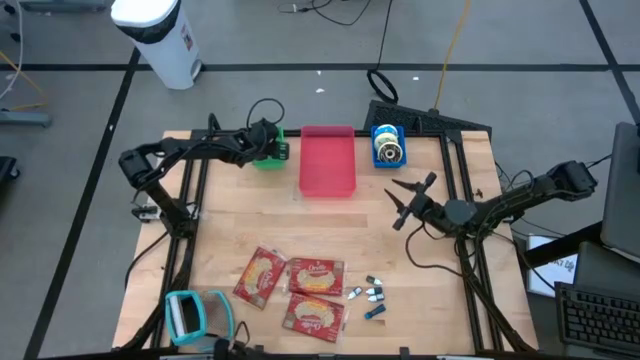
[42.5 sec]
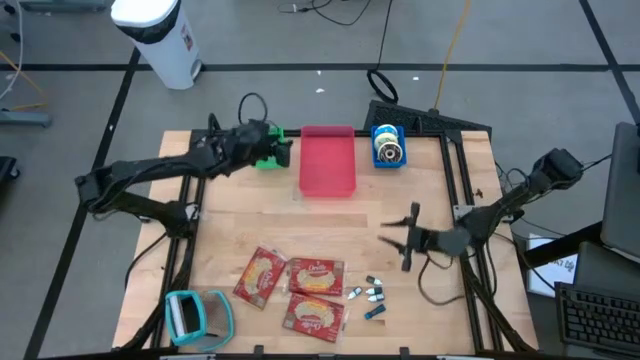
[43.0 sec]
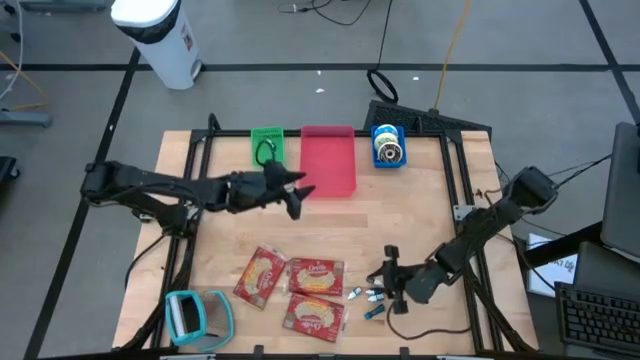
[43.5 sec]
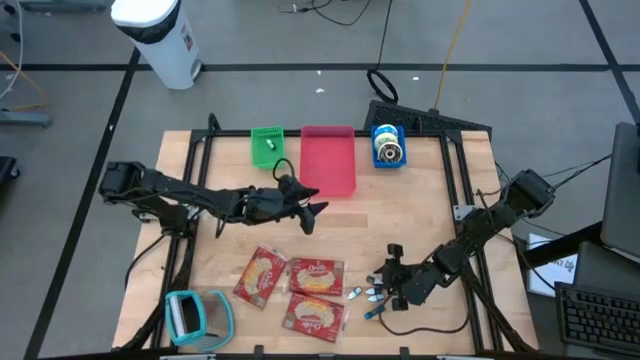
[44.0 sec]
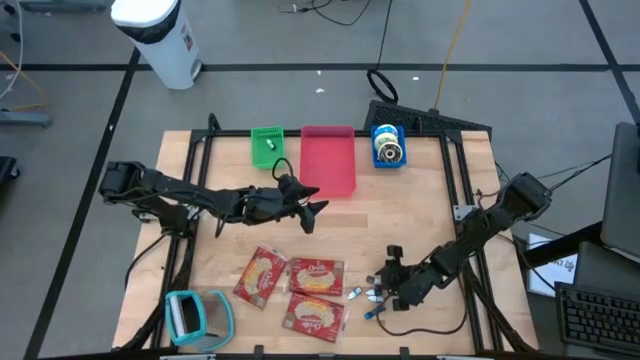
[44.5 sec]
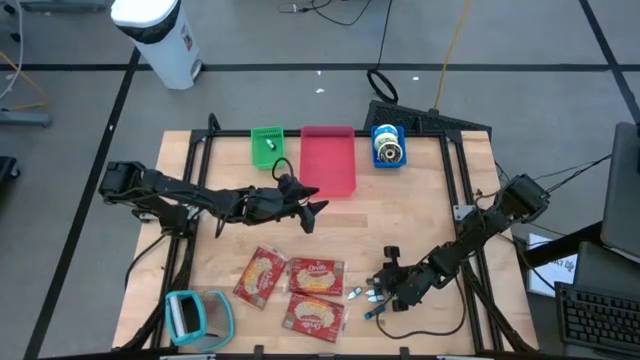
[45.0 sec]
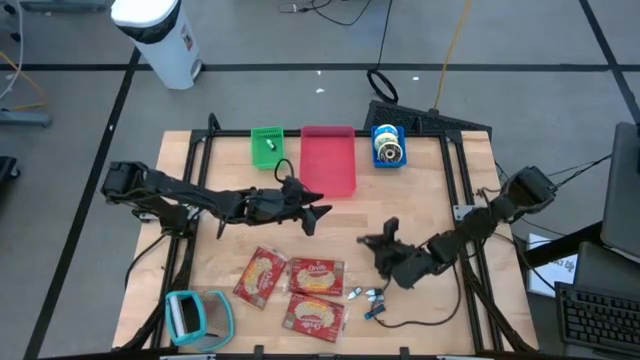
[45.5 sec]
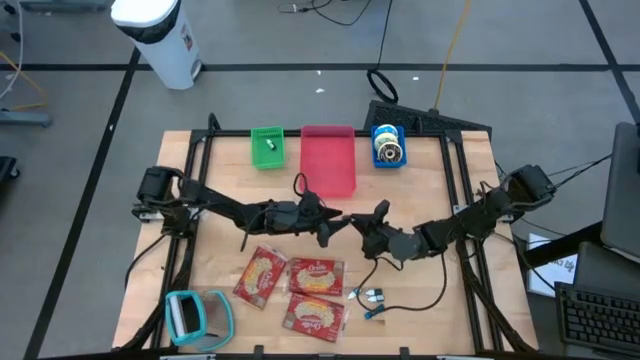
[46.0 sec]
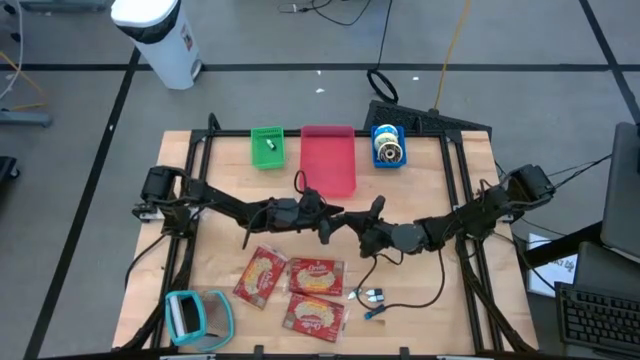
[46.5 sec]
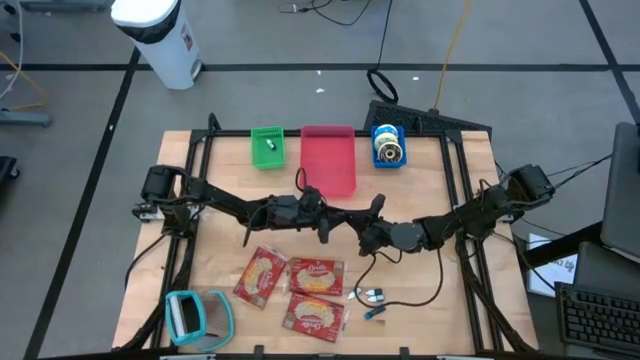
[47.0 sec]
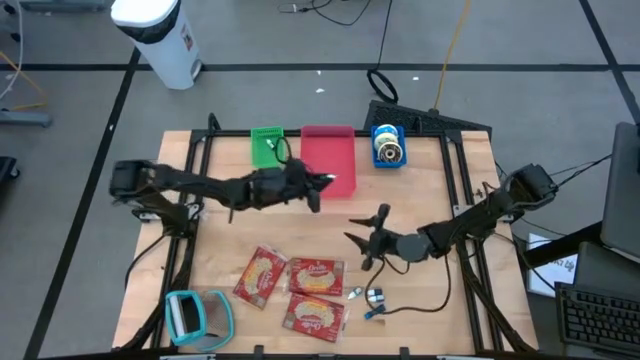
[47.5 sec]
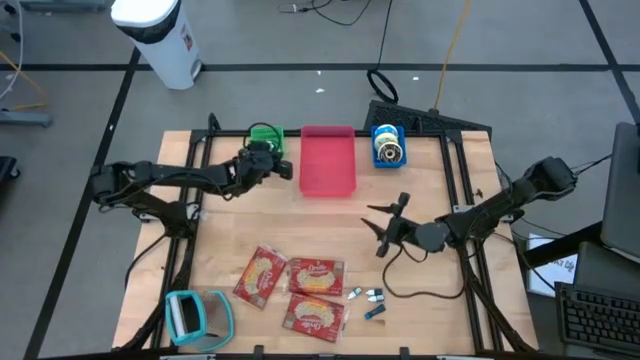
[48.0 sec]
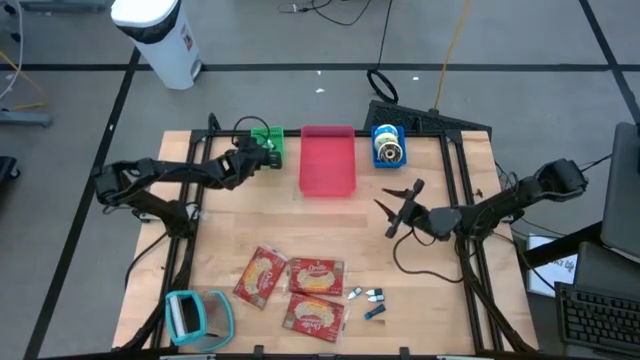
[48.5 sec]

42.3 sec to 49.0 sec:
Put the green food coloring bottle into the green bin

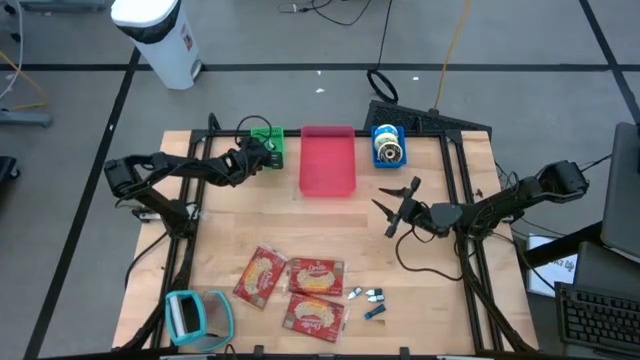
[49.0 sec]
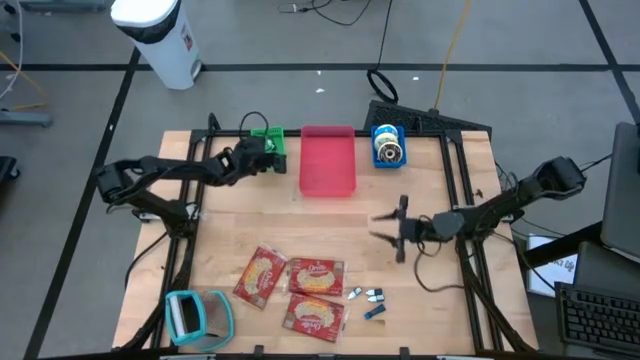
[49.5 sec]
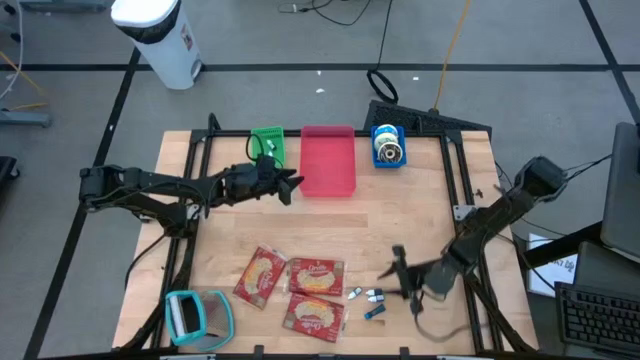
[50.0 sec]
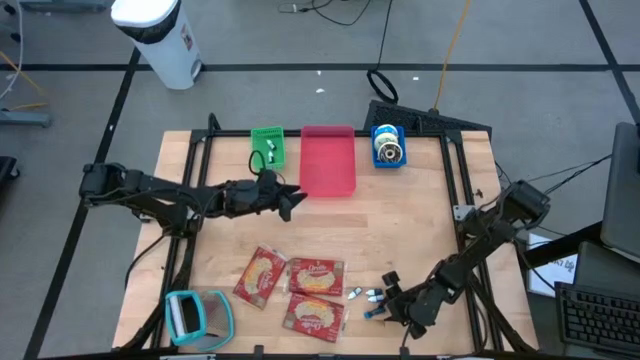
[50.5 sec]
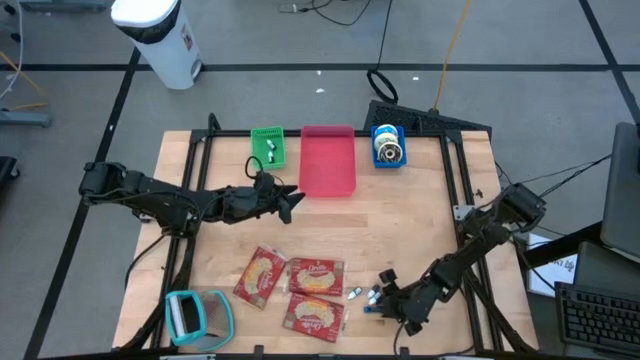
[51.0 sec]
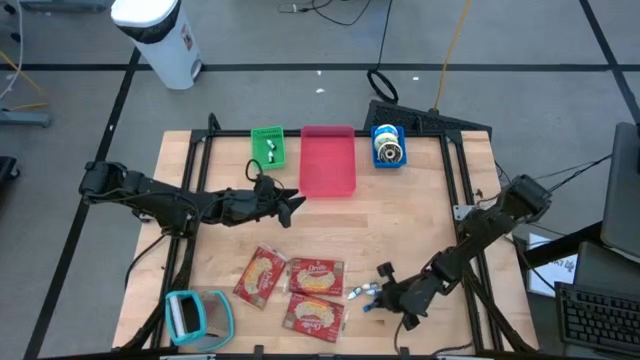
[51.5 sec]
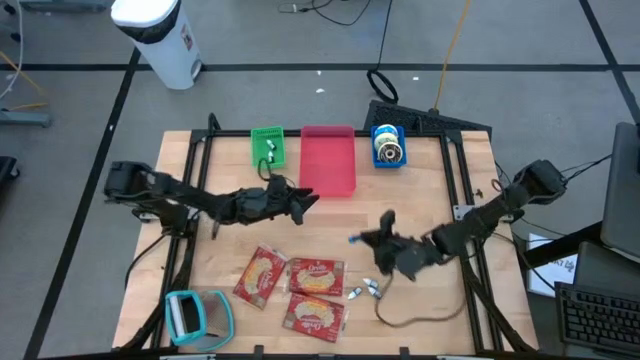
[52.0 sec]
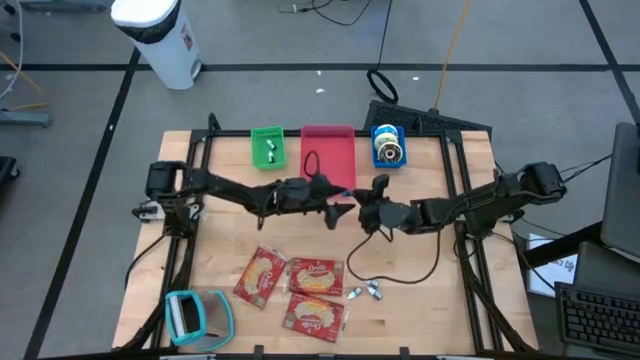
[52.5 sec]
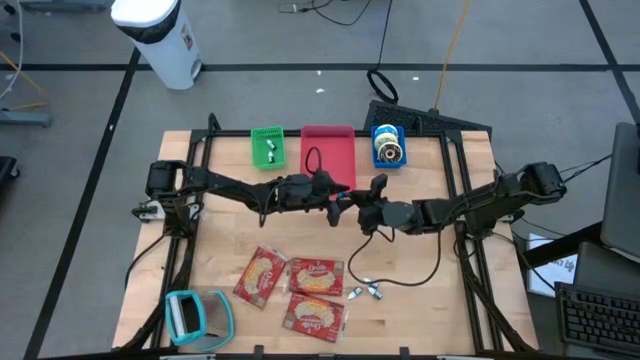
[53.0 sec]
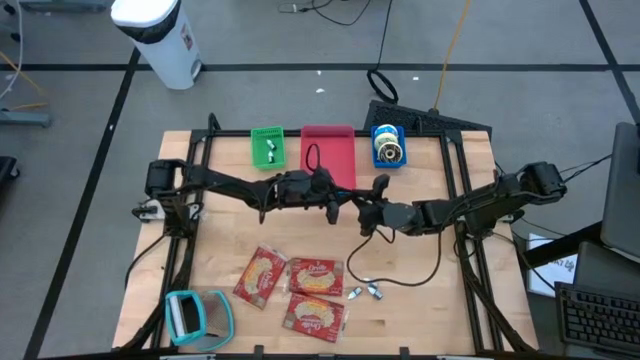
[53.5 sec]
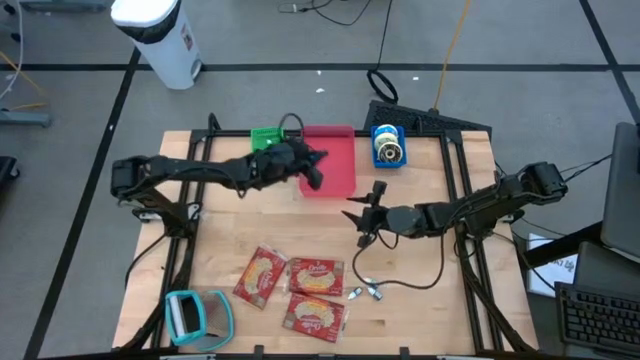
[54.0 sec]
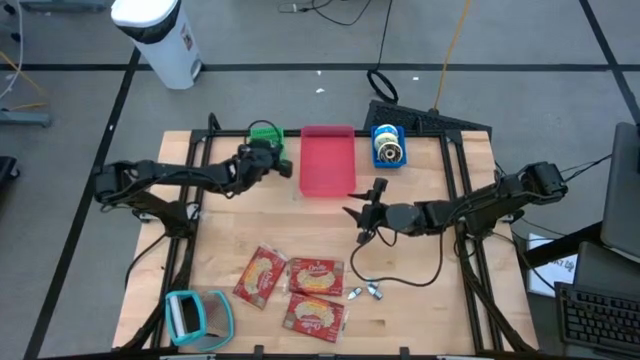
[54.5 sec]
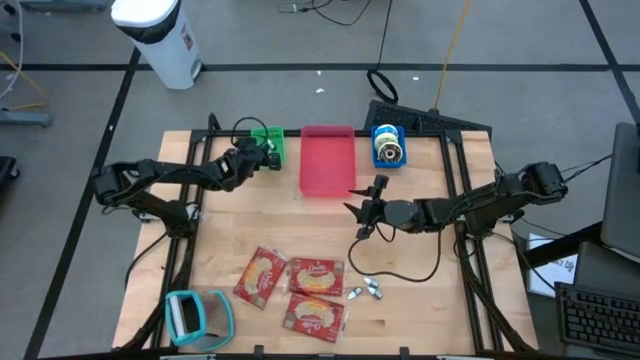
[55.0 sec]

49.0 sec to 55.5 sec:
Put the blue food coloring bottle into the green bin

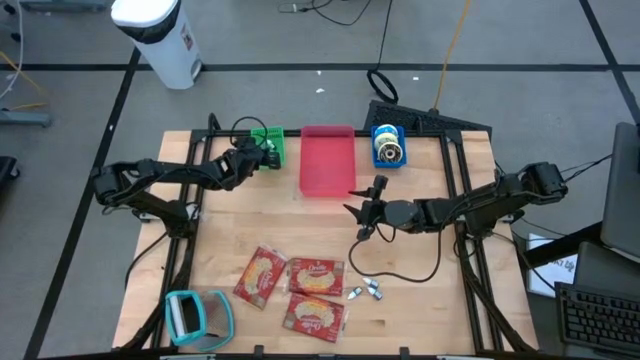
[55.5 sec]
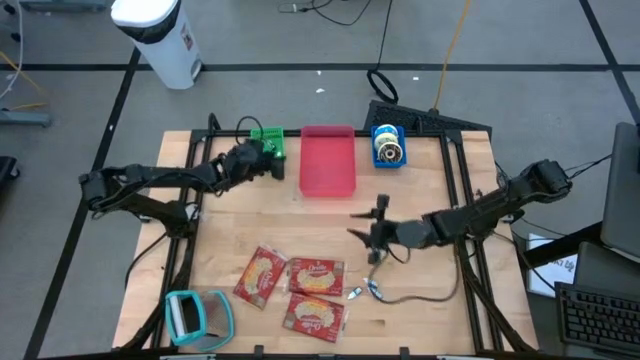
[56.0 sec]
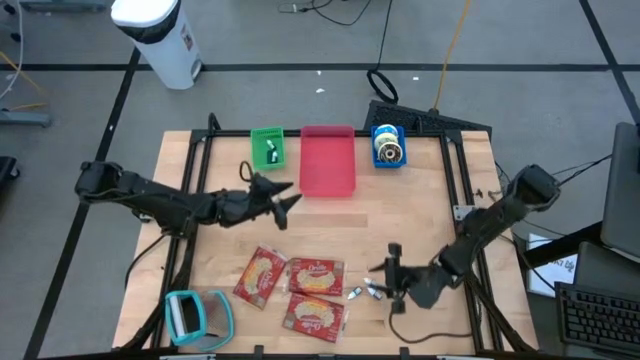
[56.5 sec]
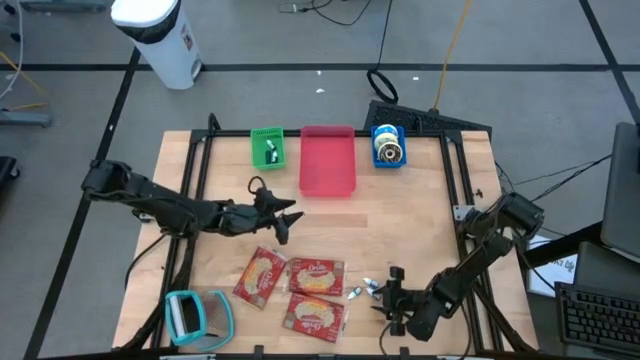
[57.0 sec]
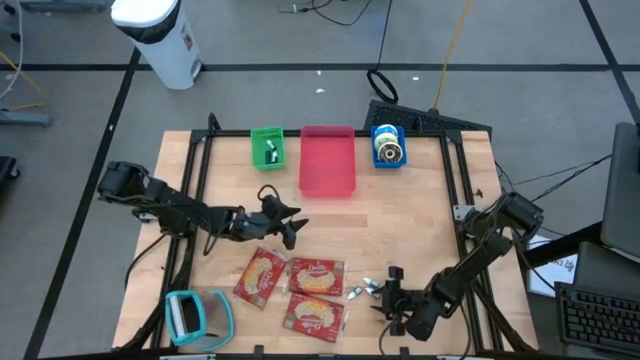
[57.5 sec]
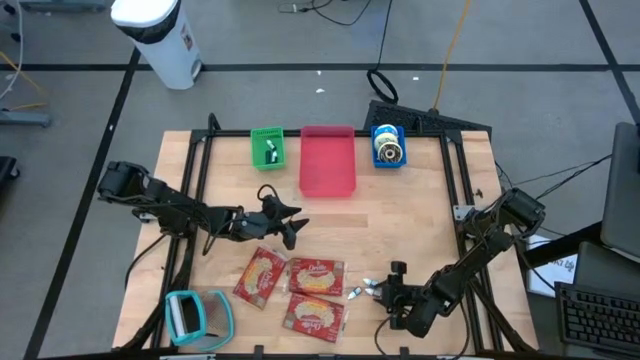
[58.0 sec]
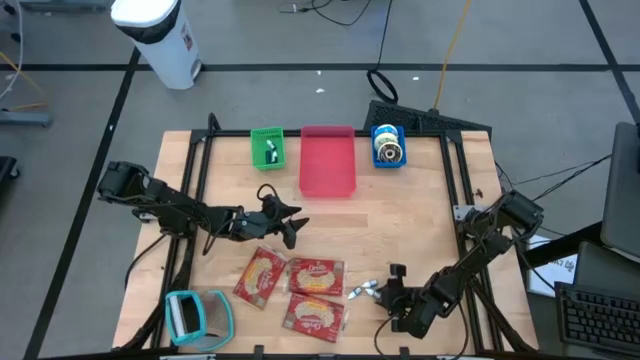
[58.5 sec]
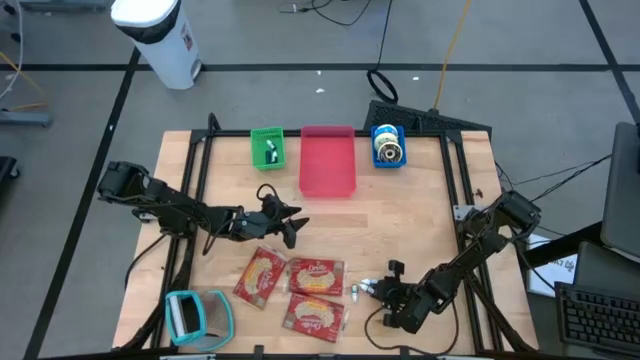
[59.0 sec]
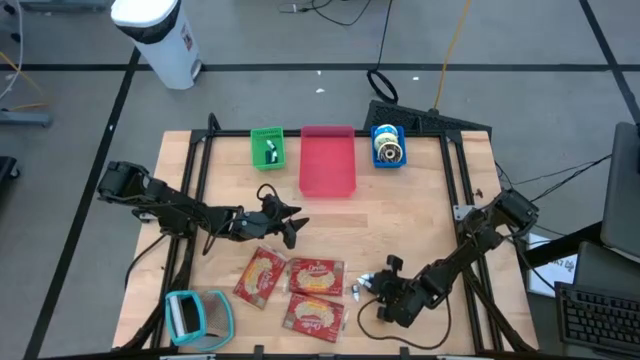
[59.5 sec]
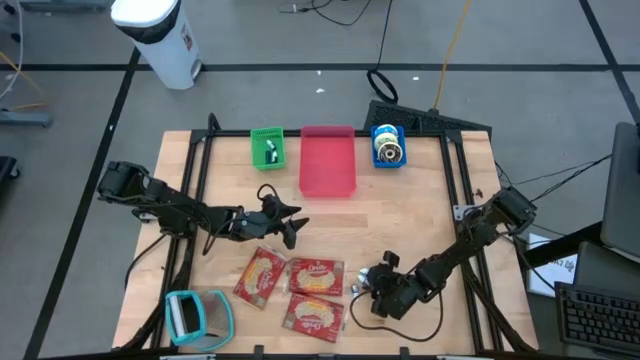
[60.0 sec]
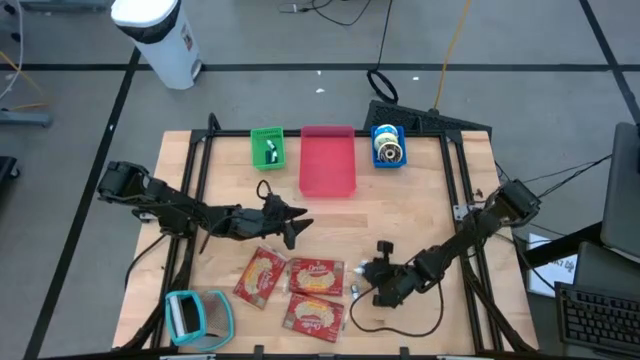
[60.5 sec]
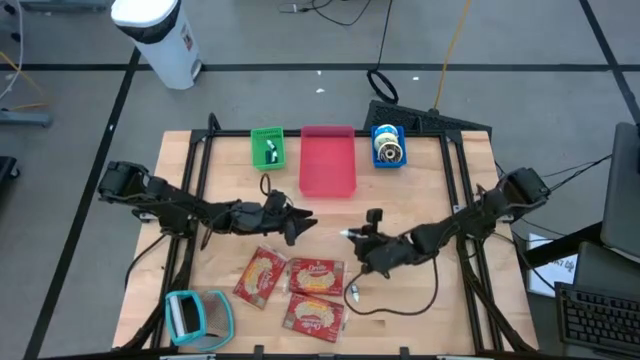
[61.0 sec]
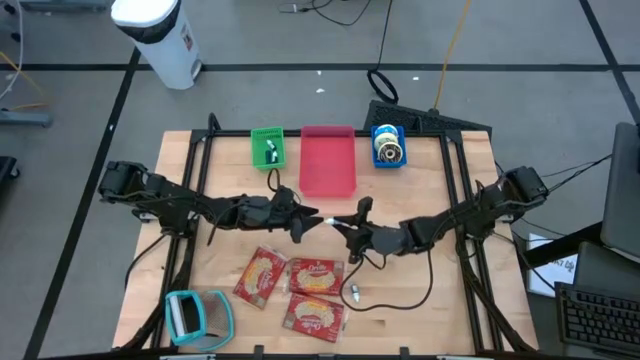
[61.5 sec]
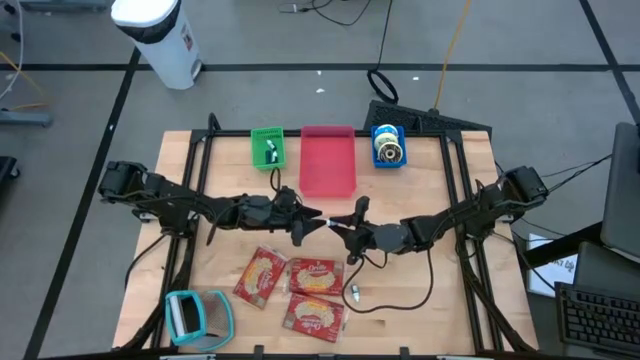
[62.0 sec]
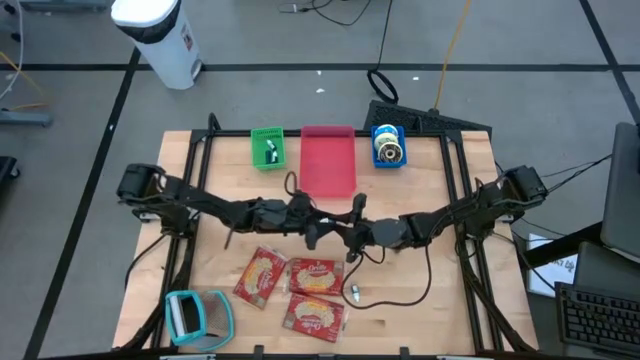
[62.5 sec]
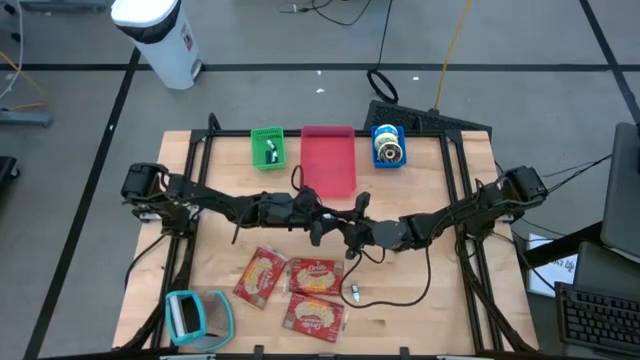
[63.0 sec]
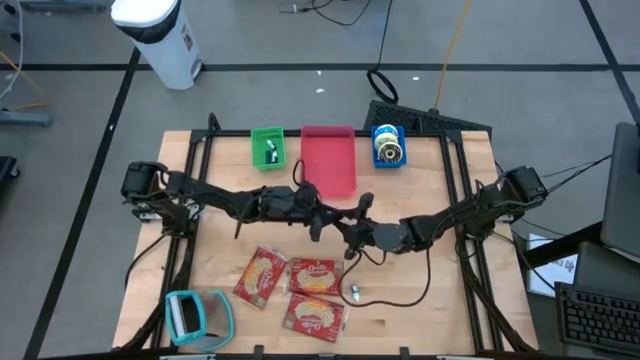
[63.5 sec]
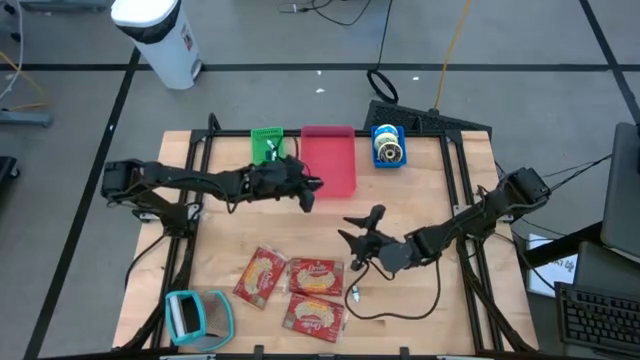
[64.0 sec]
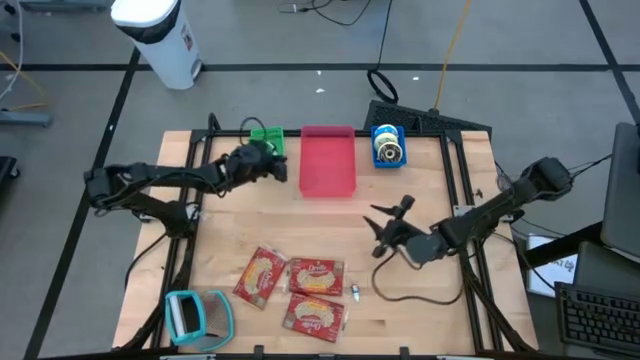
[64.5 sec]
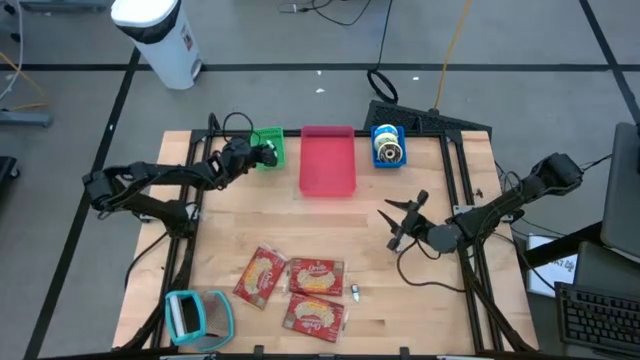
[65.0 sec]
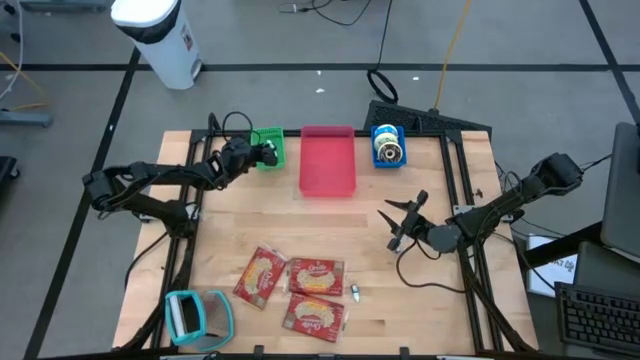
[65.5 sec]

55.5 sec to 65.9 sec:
Put the bottom violet food coloring bottle into the green bin
